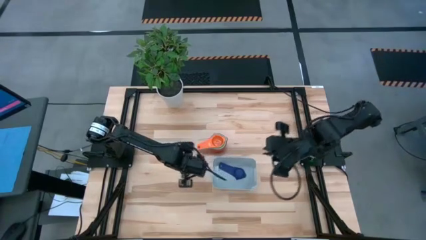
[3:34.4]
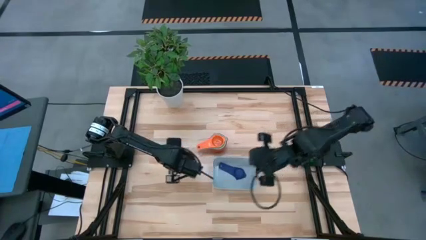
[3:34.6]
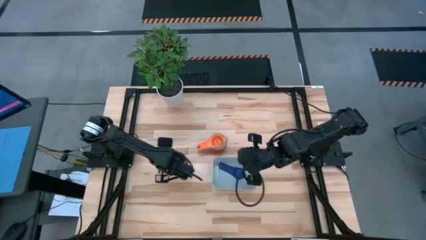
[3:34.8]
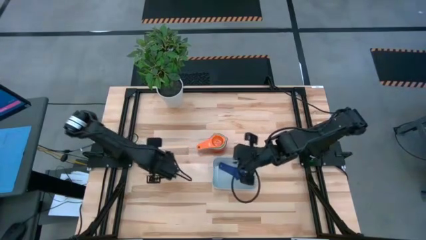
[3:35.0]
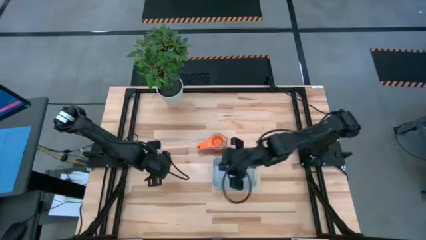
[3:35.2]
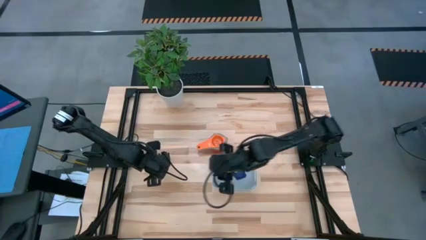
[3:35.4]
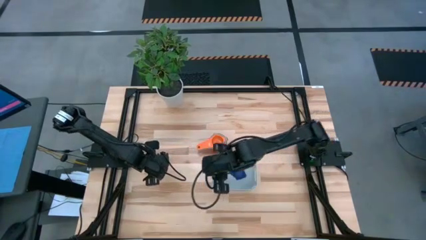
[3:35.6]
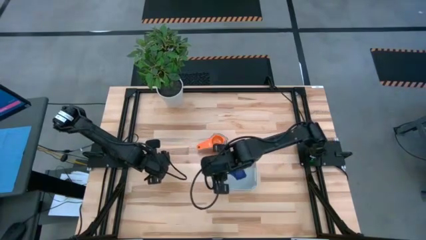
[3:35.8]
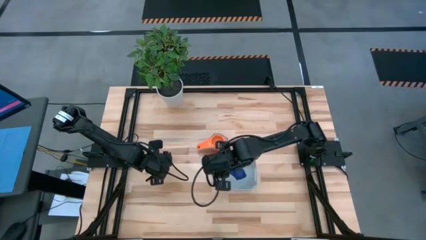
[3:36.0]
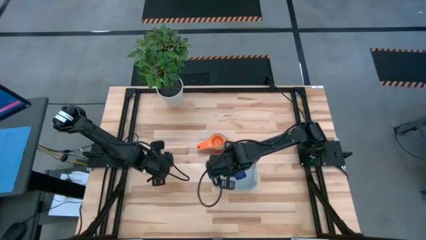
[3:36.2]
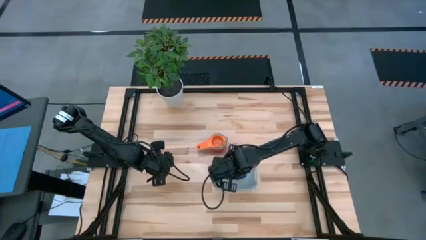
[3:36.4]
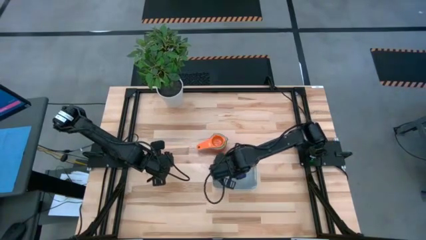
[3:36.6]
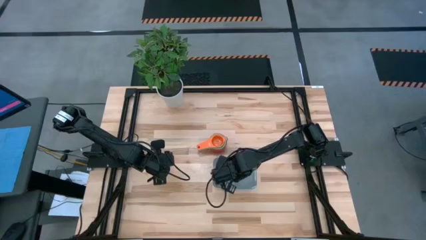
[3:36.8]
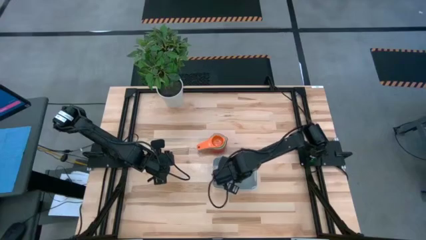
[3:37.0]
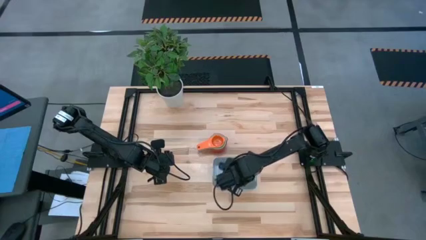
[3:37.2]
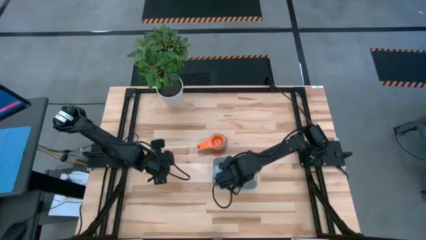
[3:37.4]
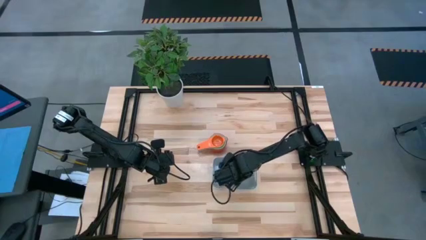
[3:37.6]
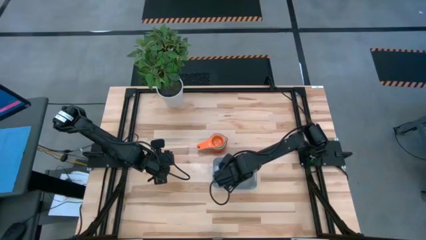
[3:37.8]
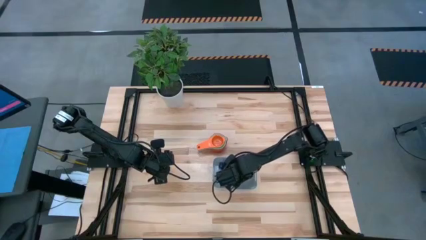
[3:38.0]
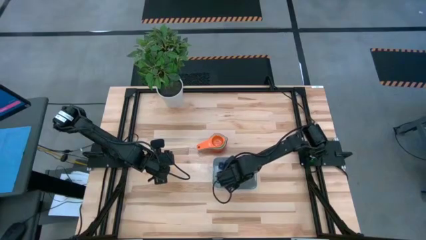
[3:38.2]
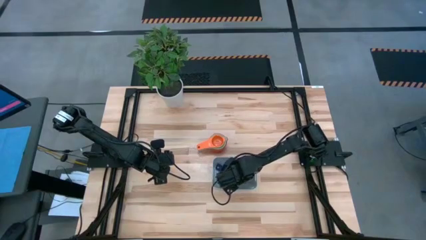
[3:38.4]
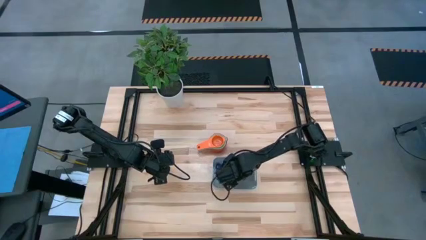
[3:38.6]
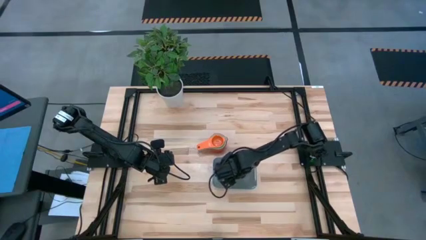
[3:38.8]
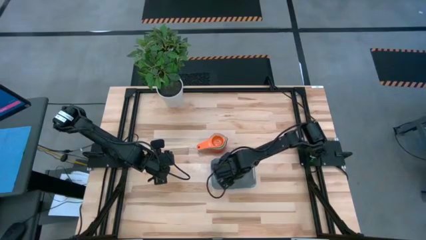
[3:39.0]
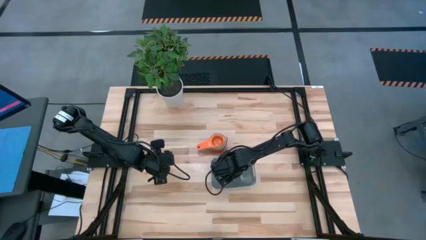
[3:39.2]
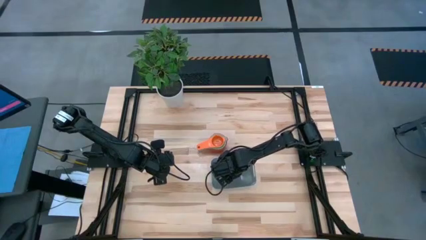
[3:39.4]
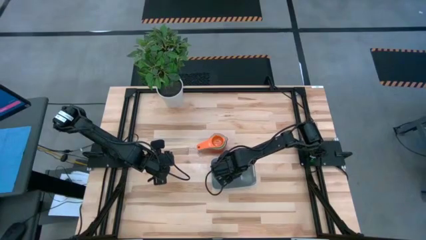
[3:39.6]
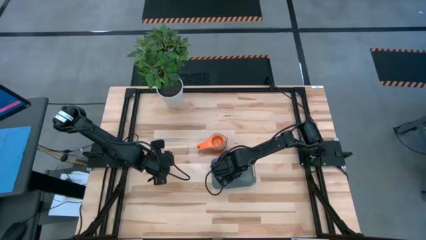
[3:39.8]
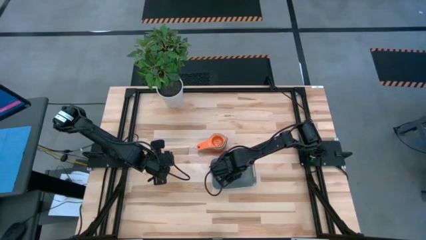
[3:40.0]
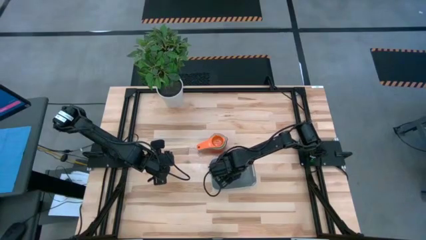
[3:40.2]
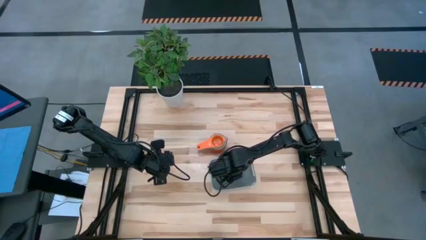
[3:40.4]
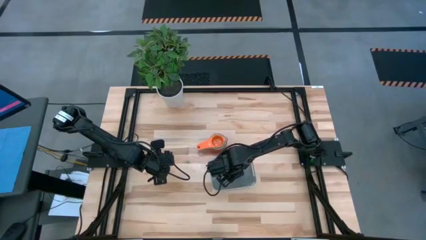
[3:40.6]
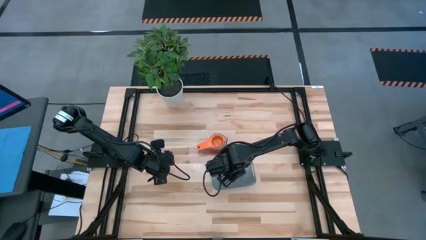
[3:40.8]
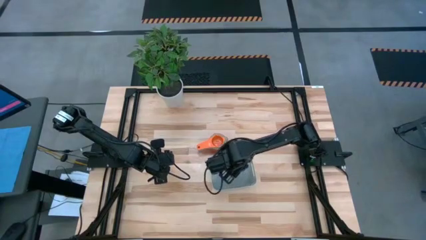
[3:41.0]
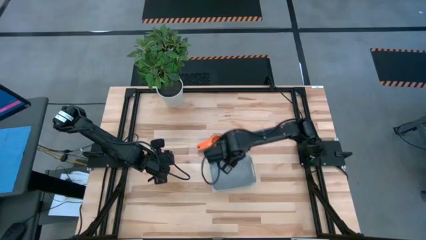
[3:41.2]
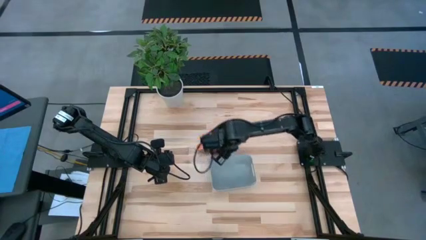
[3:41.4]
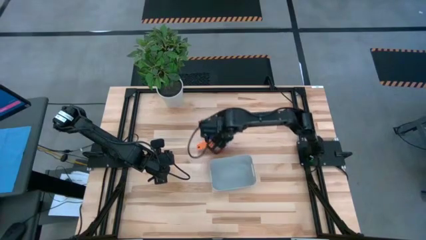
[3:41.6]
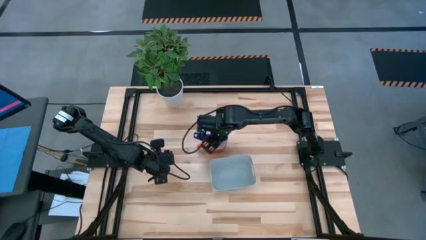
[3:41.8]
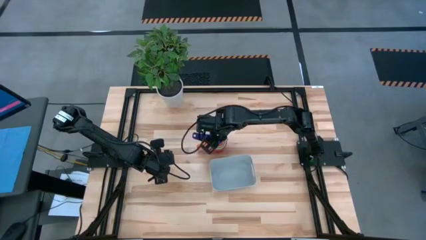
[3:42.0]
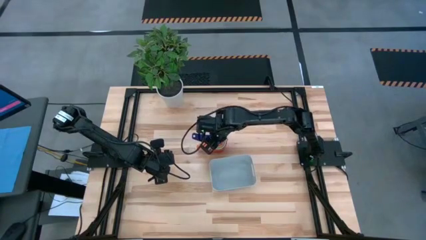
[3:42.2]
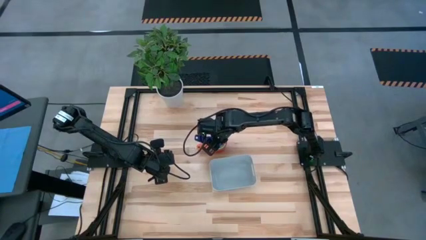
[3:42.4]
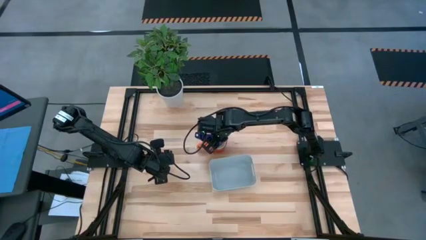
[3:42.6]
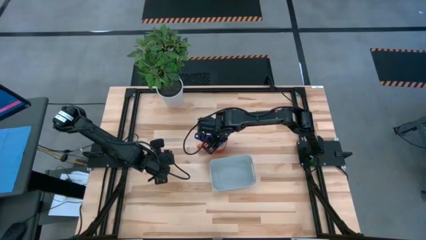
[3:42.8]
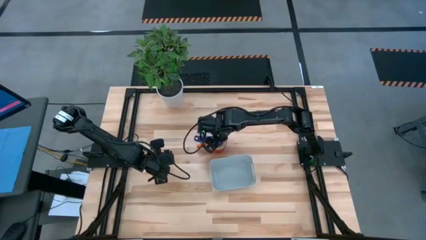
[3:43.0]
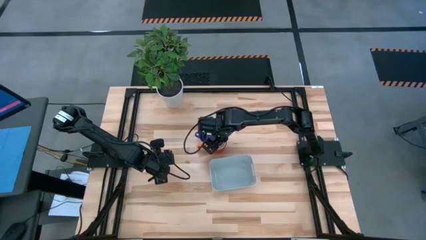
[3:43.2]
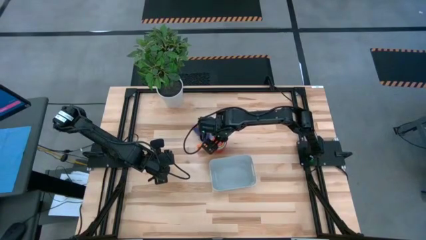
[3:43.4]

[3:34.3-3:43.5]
Task: Nest measuring cups in basket
Remove the dark blue measuring cup from the gray bin

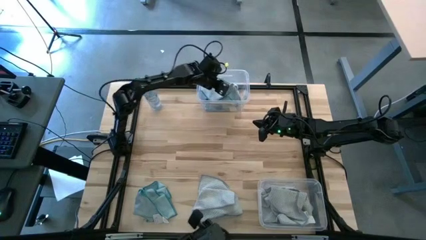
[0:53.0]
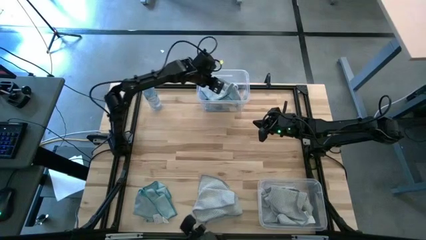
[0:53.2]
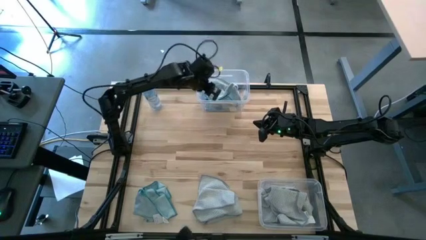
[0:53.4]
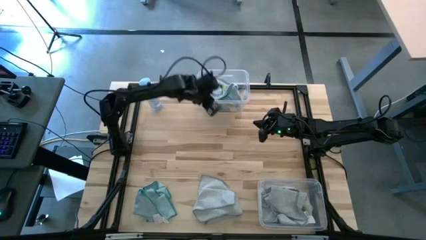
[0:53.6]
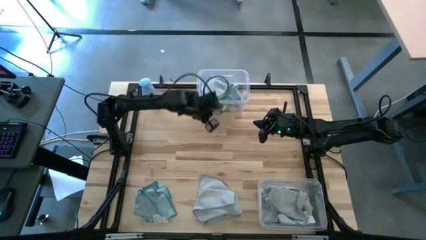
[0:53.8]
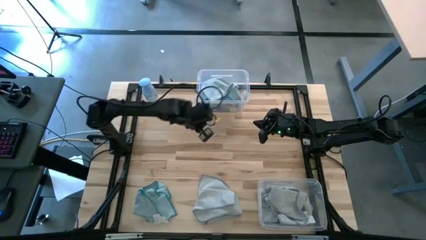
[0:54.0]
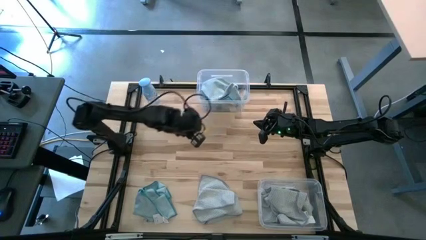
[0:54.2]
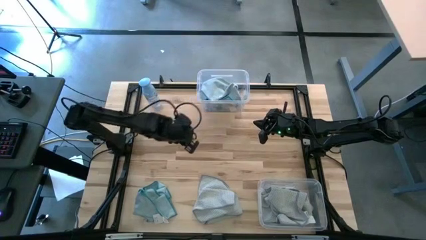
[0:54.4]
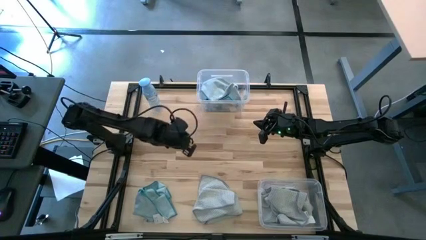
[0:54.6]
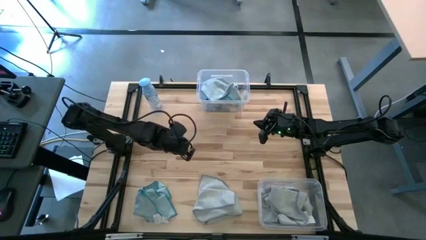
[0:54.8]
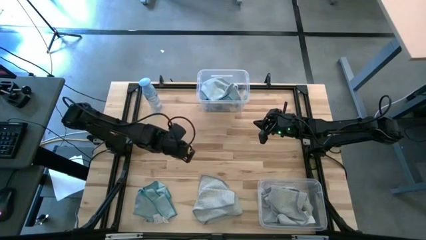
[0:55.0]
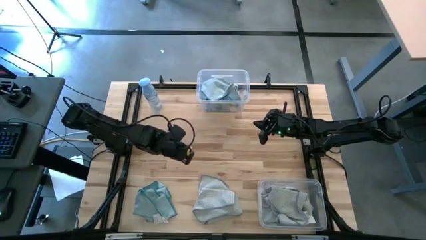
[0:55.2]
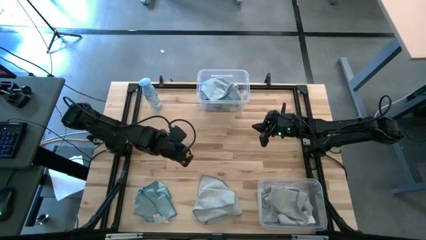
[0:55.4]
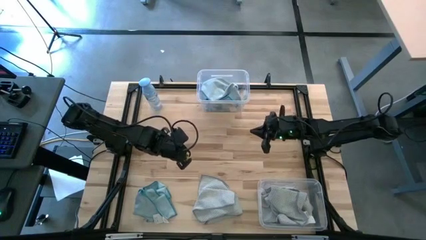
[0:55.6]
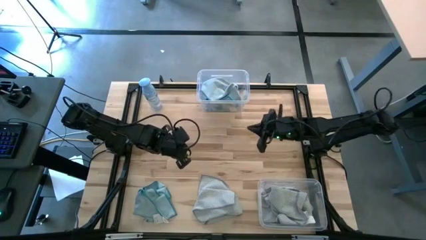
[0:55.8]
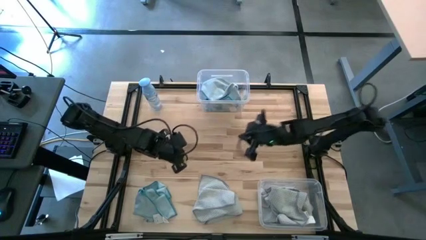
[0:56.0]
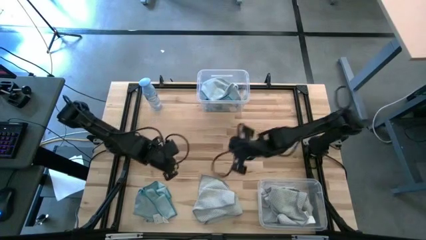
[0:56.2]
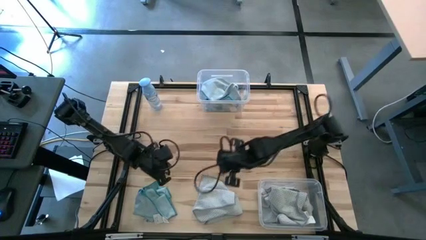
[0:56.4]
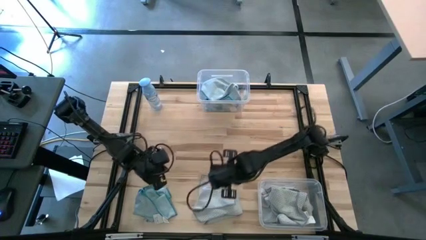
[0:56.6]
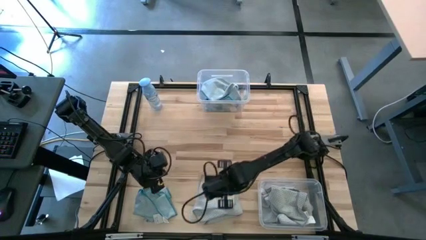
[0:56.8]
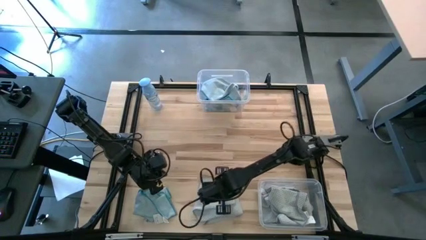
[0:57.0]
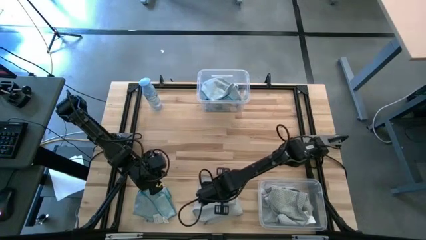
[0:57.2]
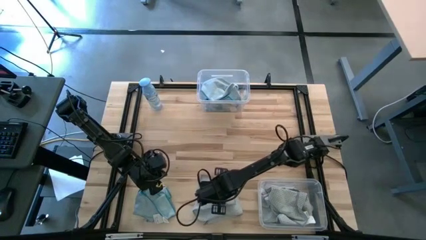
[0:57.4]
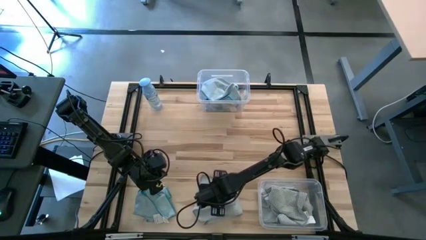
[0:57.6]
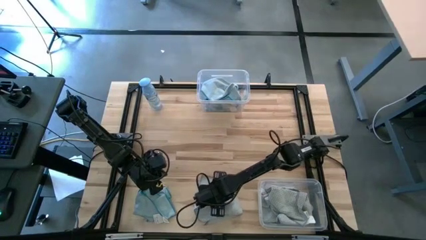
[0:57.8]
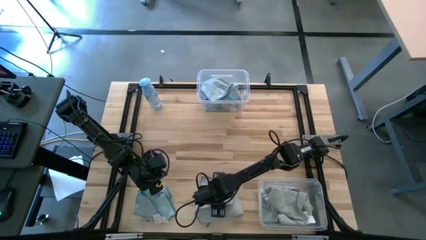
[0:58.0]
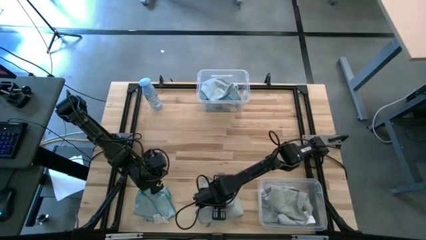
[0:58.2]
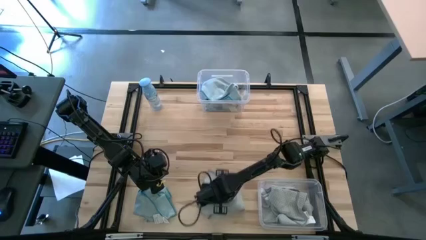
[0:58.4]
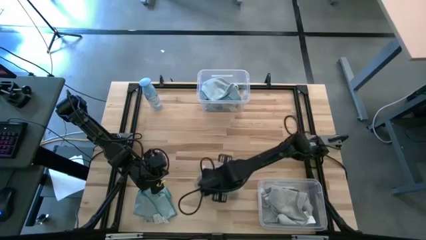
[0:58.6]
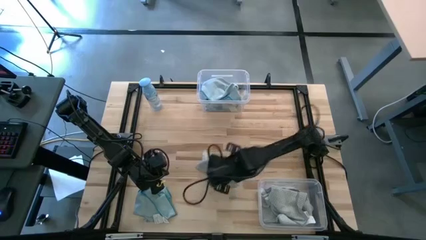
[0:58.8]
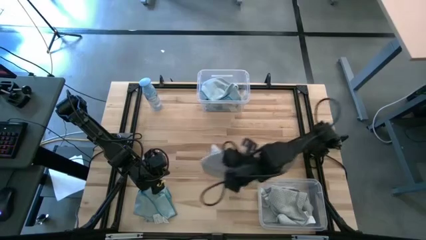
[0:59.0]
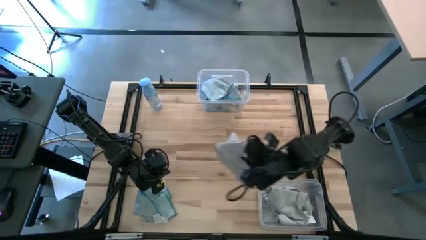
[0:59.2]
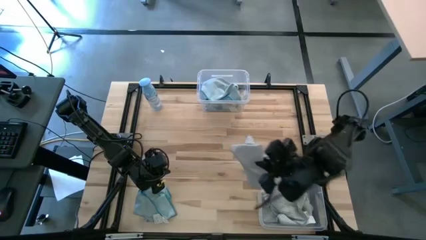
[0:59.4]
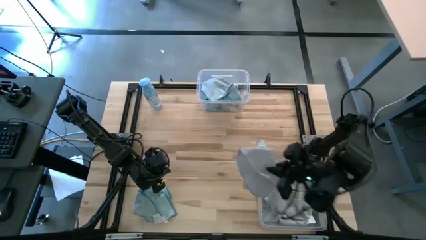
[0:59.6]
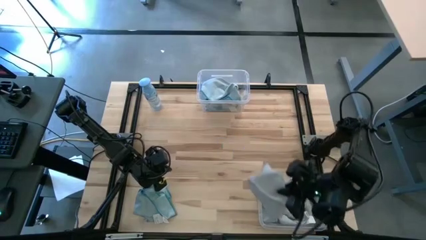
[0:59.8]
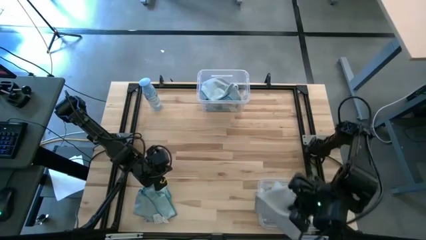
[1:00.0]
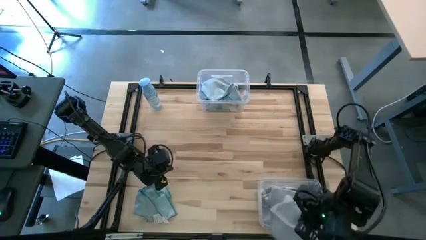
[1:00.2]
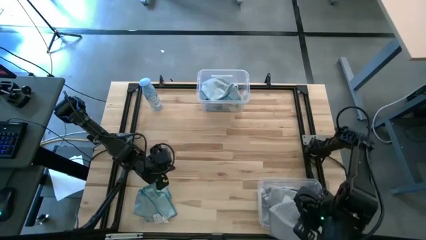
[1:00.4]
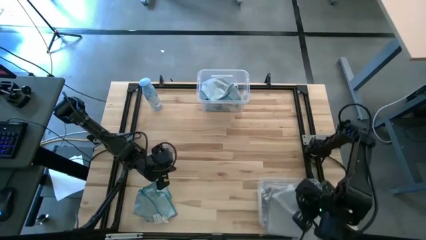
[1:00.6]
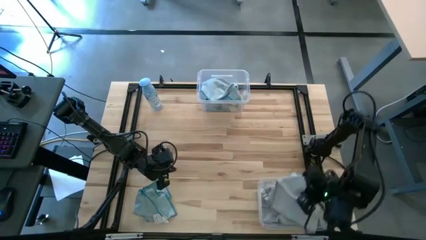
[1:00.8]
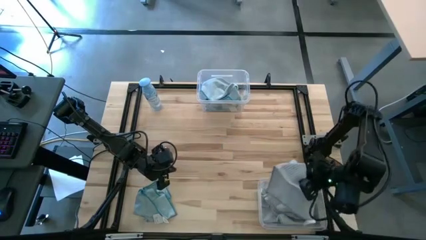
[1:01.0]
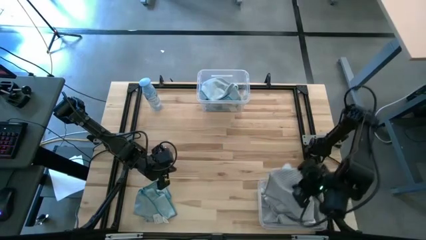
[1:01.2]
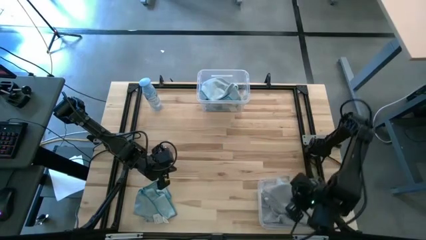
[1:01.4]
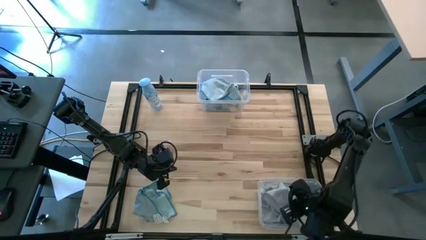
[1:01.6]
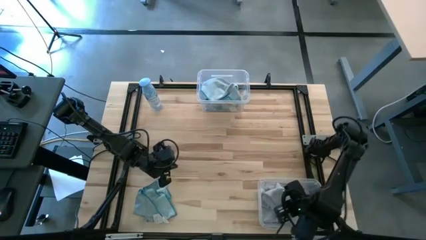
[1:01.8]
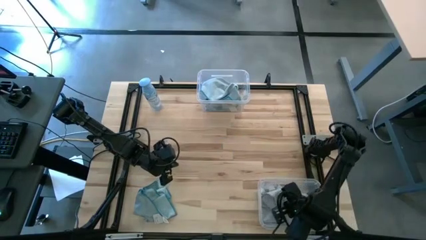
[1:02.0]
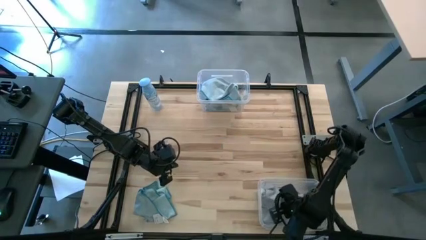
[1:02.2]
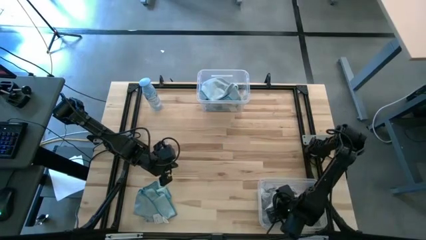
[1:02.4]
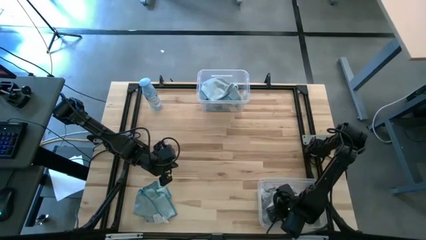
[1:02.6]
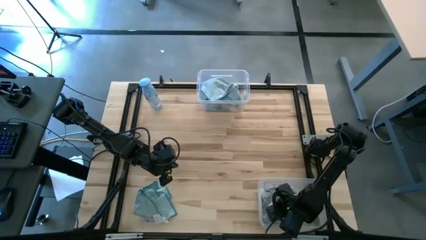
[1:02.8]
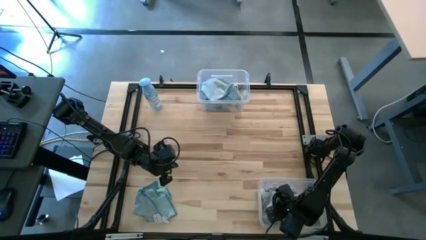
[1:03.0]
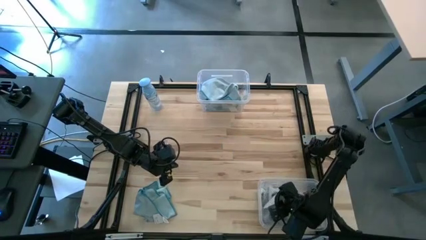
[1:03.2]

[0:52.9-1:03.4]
Task: Sort microfiber towel by color & place in baskets
Put the gray towel into the bottom transparent bin
